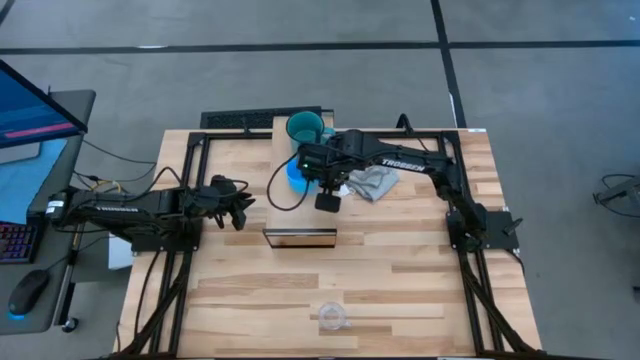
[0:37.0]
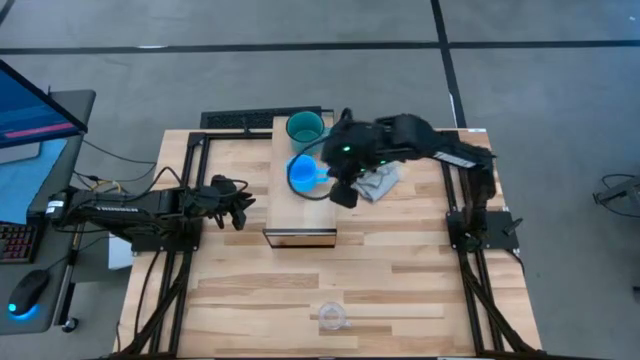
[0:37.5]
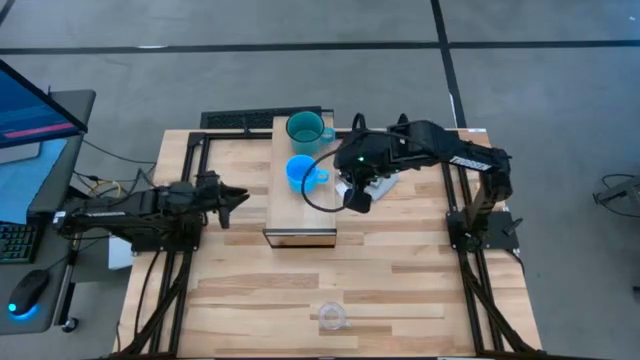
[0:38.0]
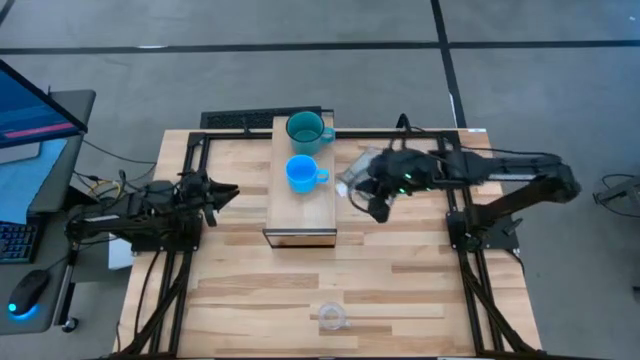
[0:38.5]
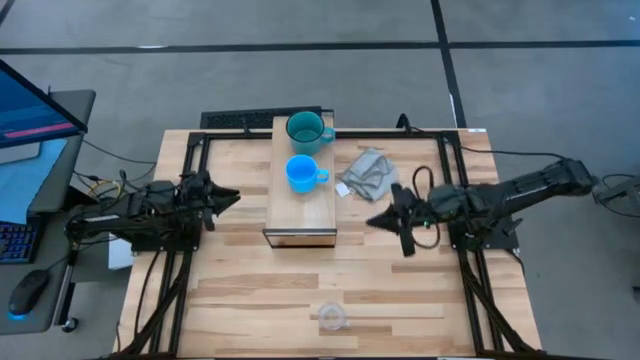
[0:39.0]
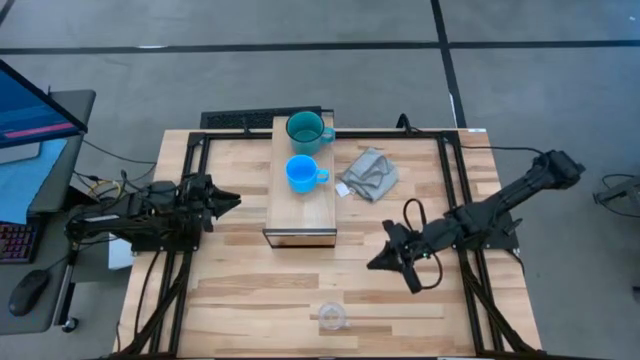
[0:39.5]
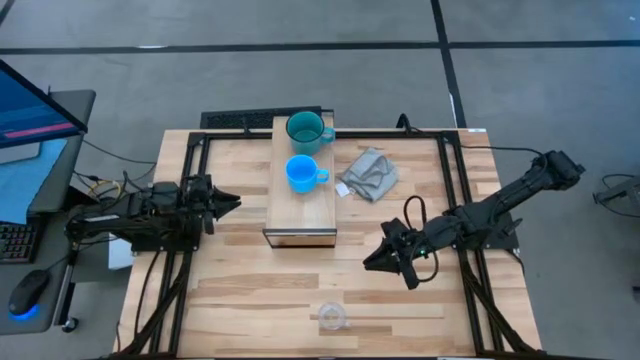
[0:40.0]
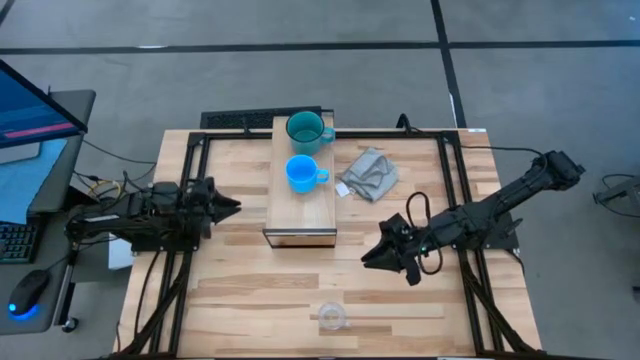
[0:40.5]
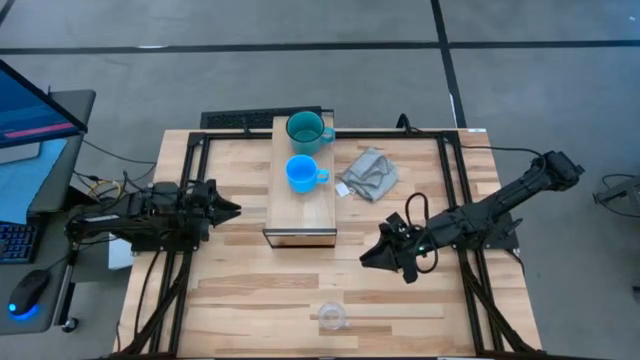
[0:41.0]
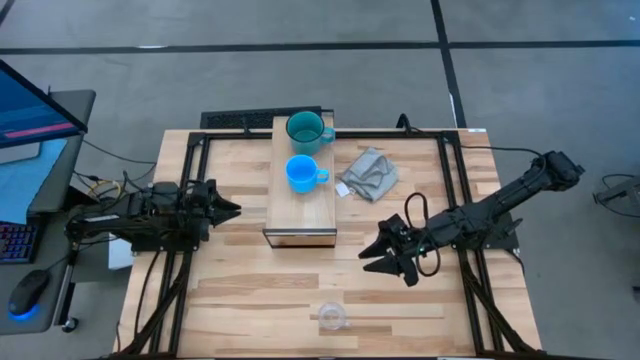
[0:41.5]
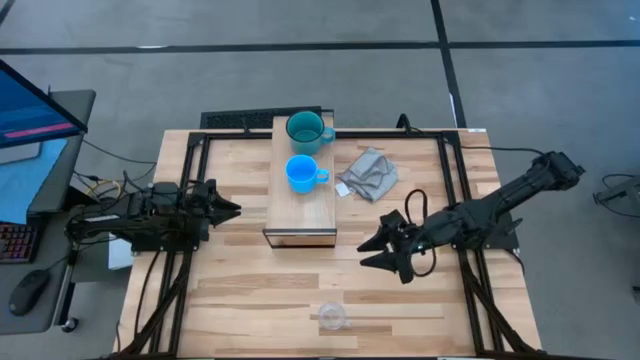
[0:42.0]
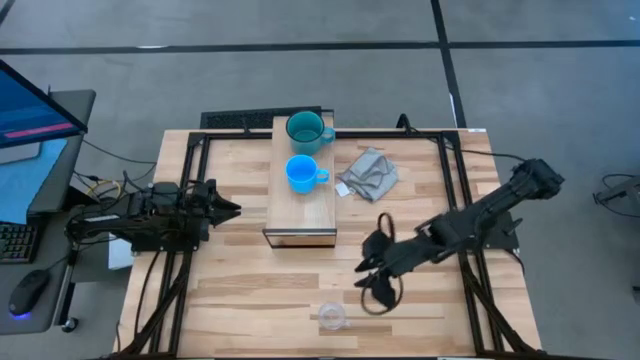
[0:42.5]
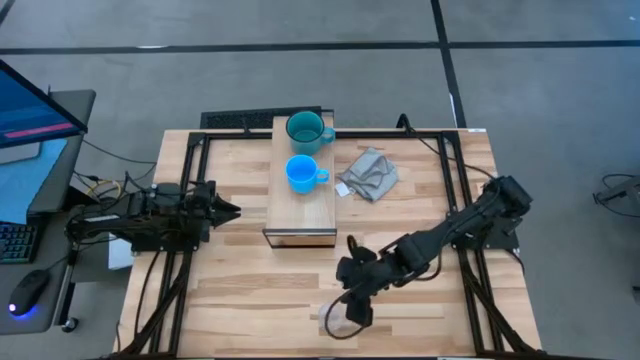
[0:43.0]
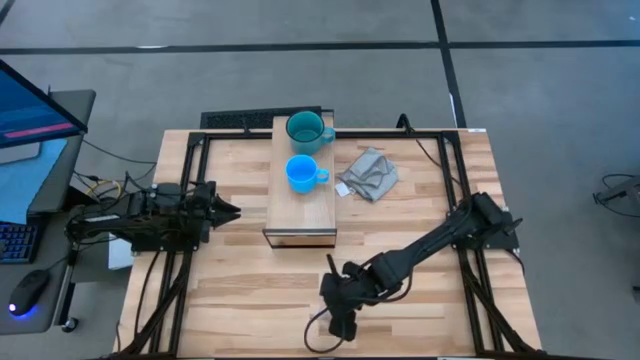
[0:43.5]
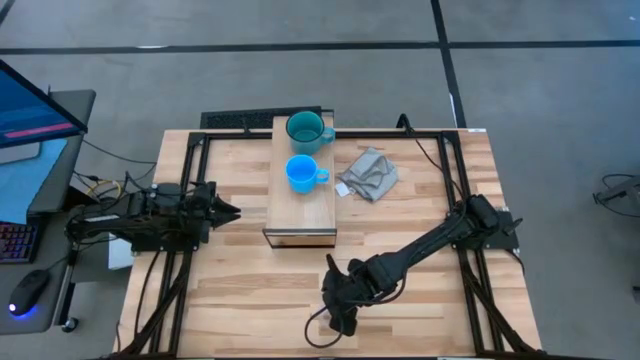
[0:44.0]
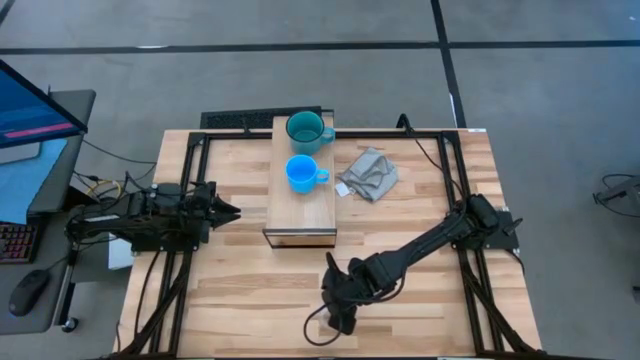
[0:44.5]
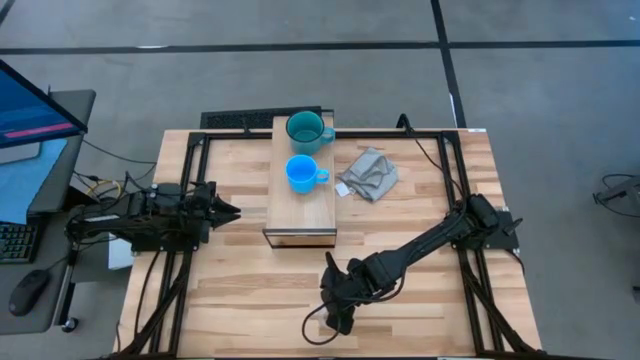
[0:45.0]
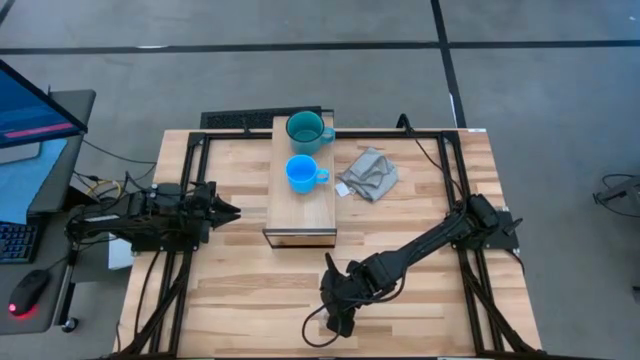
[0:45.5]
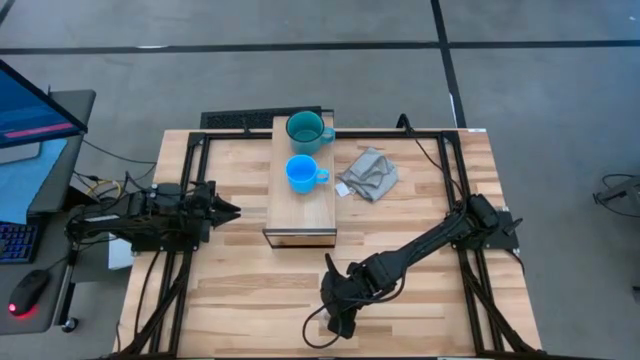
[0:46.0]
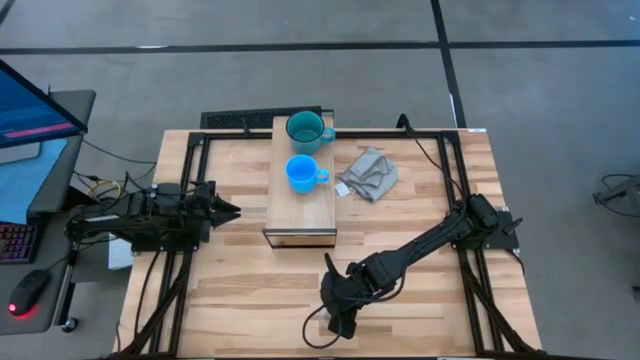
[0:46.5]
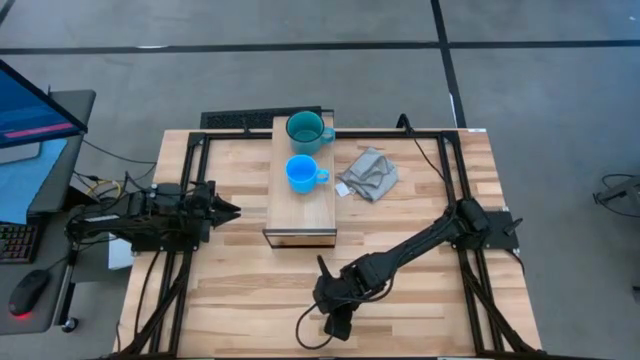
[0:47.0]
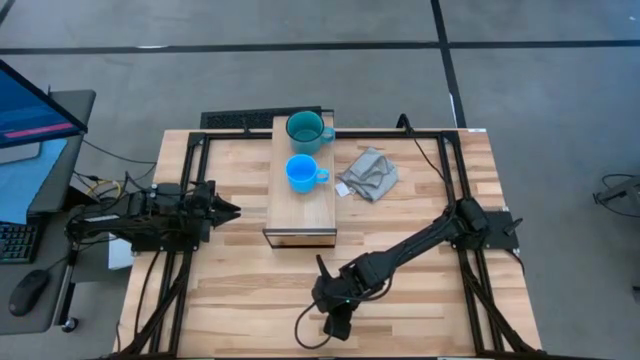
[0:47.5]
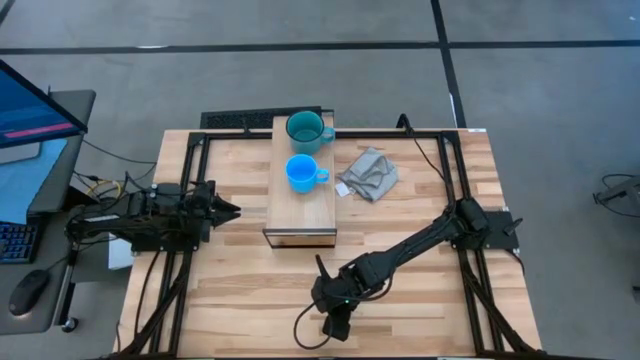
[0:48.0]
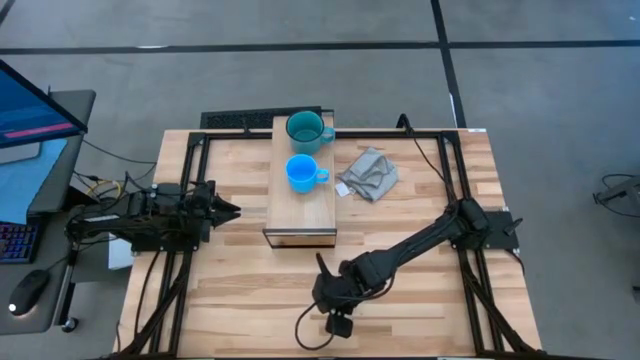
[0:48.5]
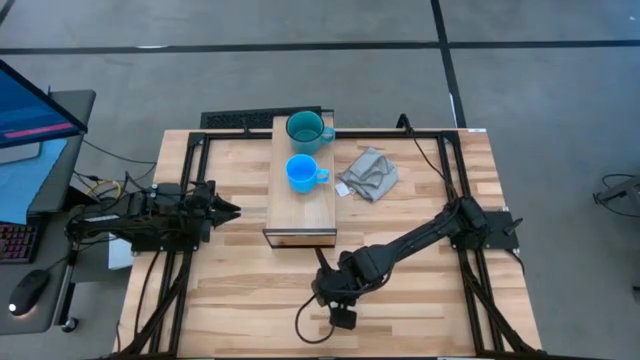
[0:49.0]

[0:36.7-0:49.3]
Task: Stack small to large cups/mugs on shelf
Put the transparent mug on the shelf
